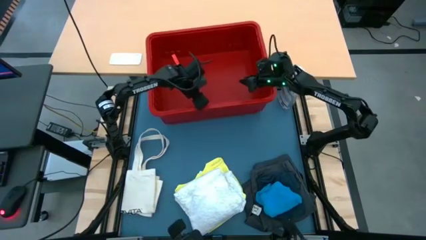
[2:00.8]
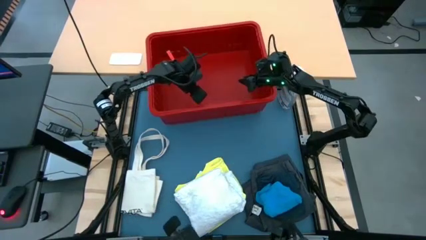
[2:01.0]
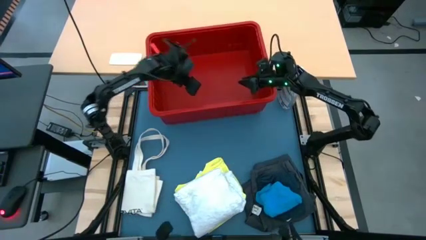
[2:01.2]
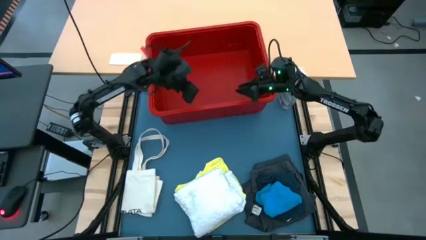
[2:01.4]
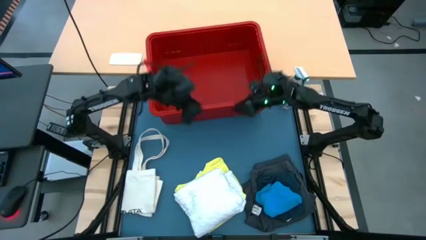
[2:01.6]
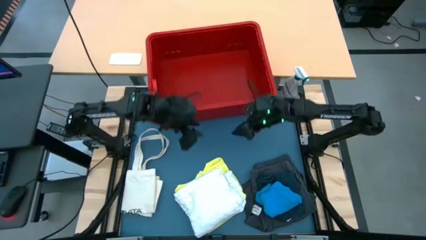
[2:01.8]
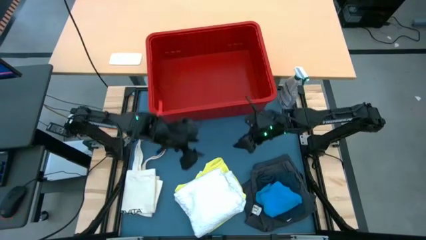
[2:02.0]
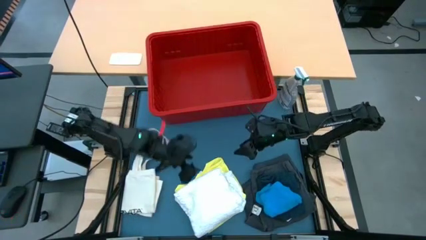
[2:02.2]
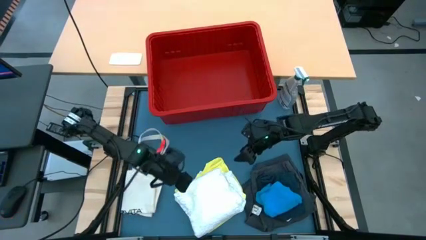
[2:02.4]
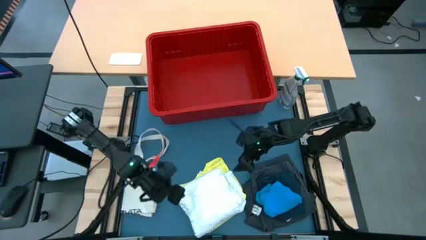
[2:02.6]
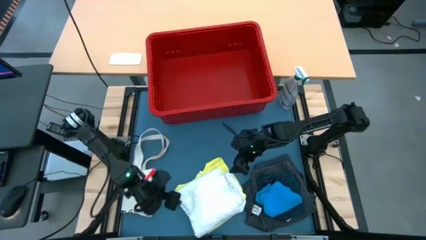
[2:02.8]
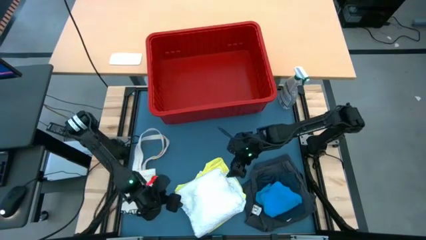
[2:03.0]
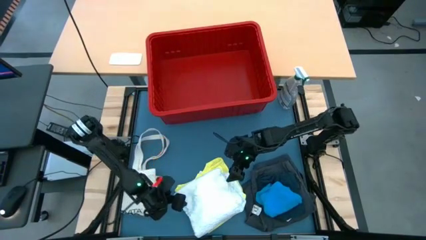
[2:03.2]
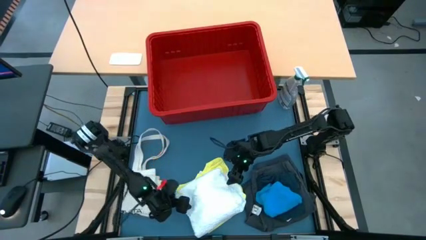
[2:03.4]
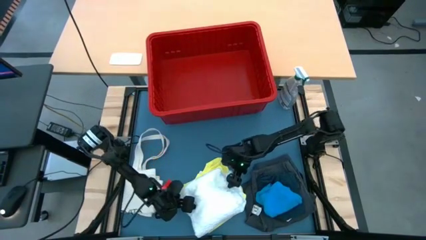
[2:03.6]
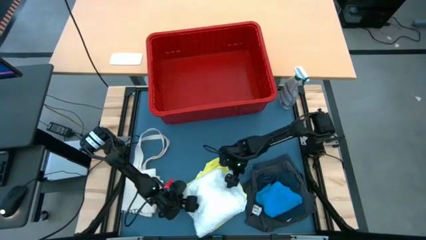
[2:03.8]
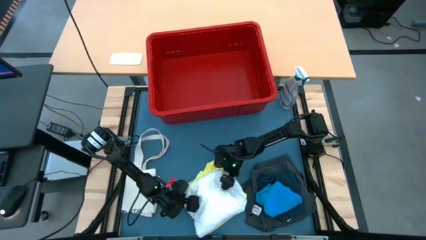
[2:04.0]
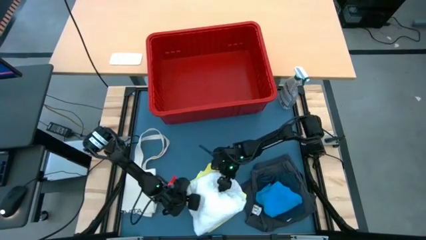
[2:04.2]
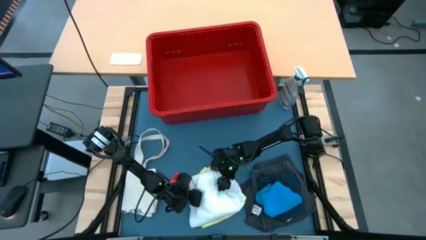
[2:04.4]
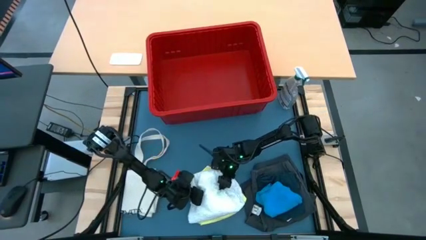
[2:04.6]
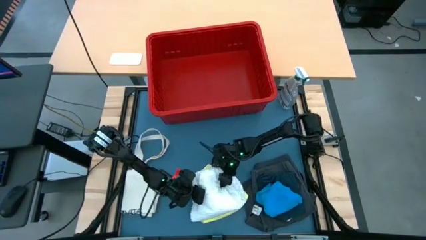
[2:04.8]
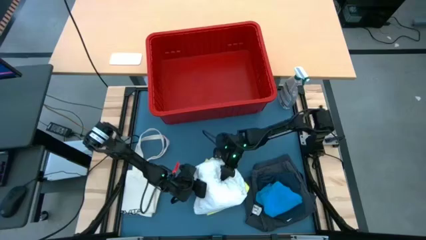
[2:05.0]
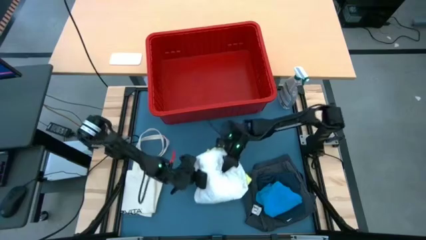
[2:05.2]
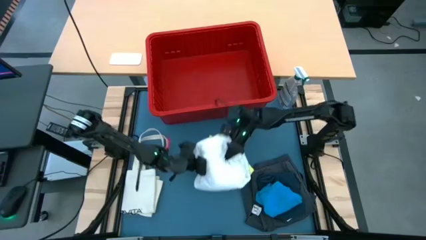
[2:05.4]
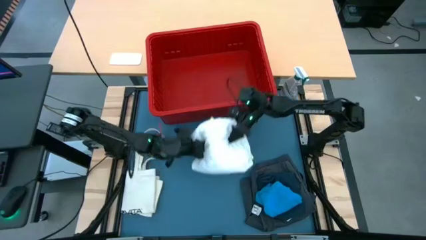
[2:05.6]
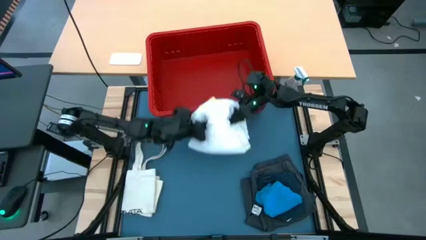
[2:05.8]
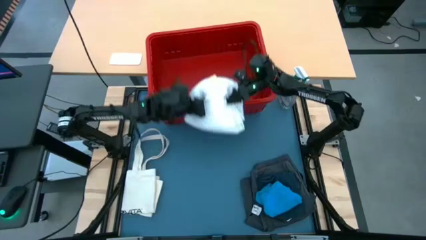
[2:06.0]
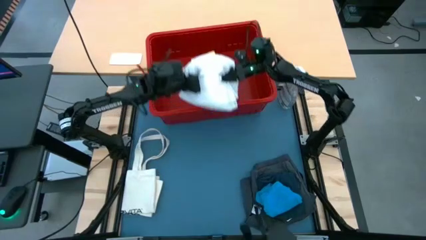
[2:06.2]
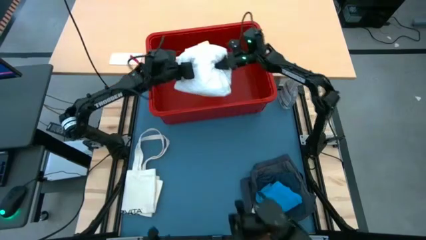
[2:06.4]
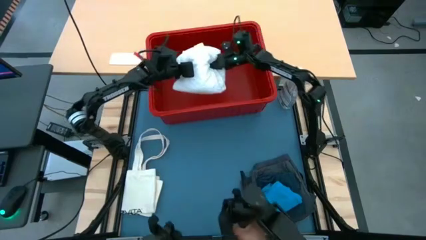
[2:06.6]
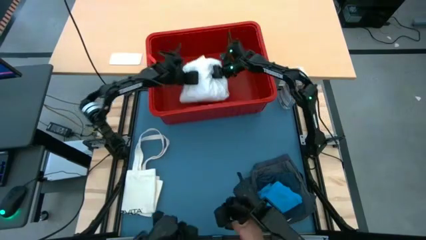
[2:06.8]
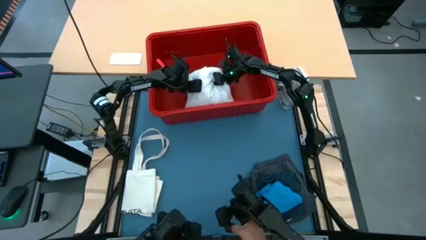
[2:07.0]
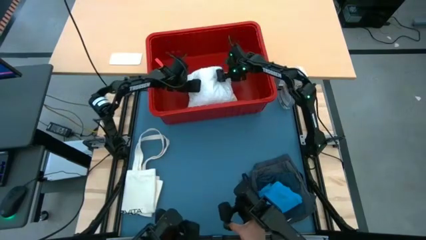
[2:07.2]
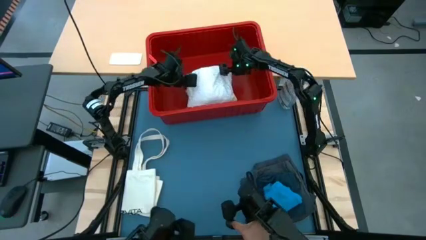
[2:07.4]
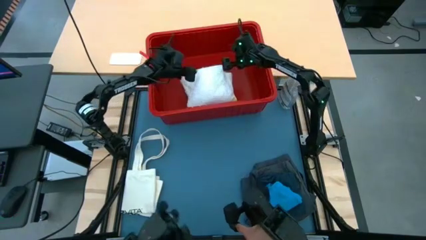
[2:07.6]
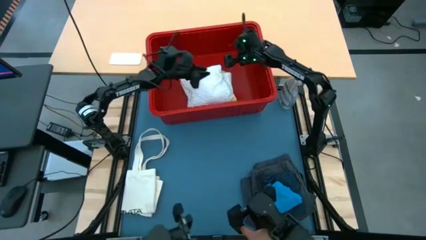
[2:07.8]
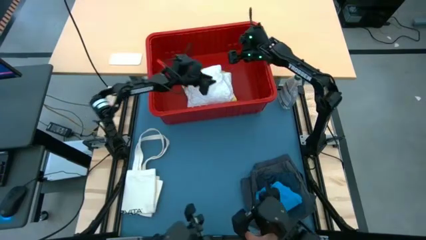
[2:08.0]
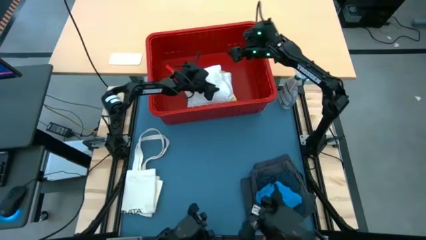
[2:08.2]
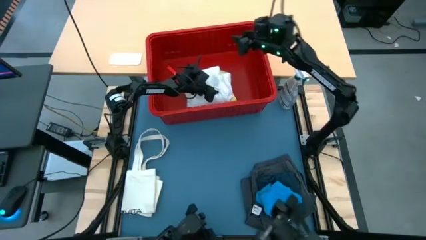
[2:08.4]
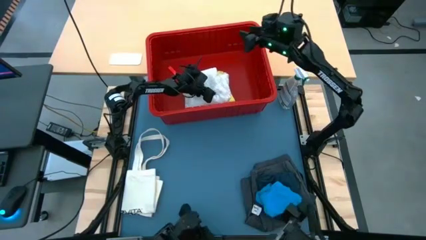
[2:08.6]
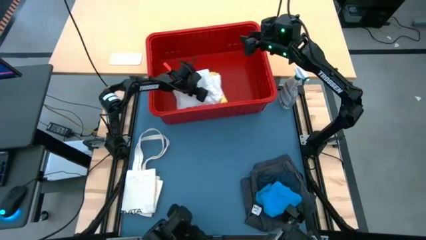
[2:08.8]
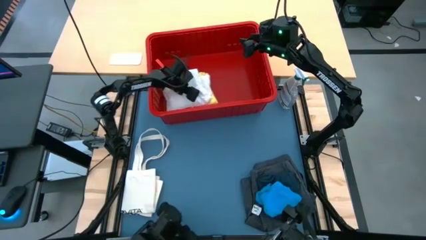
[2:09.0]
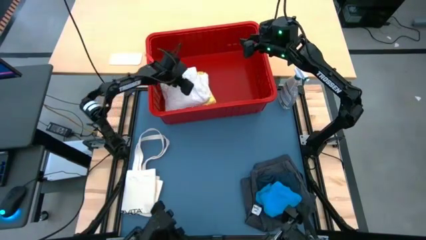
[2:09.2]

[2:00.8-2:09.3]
Task: Fold Laundry from Bin
Put the stacked folded shirts into the laundry bin

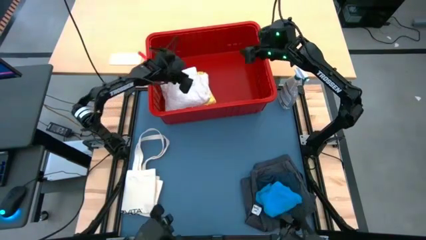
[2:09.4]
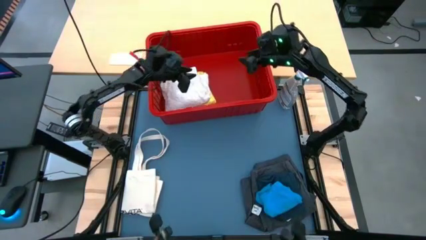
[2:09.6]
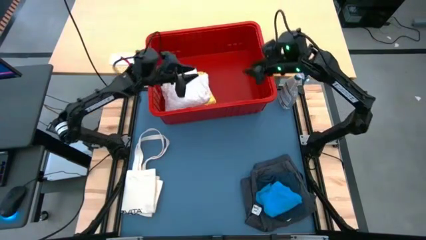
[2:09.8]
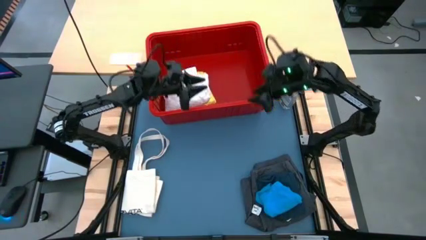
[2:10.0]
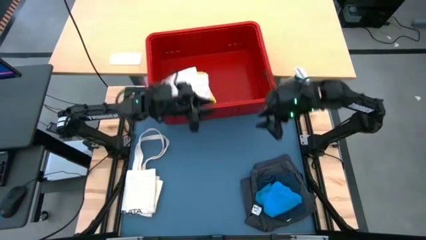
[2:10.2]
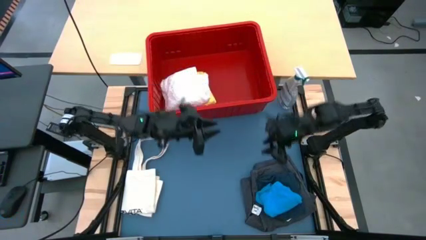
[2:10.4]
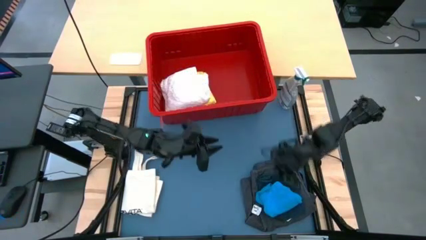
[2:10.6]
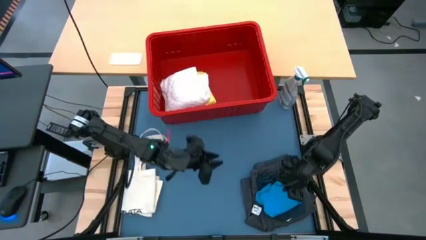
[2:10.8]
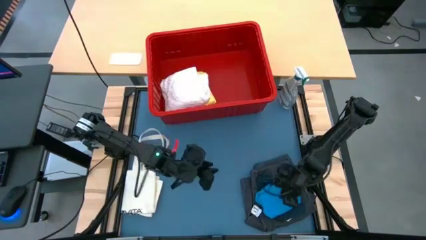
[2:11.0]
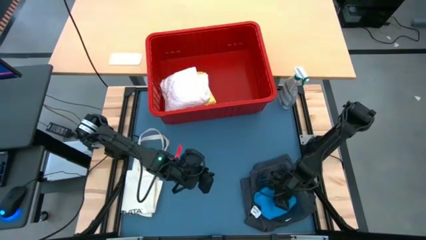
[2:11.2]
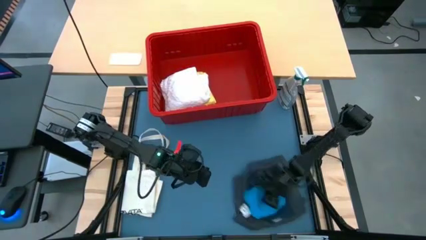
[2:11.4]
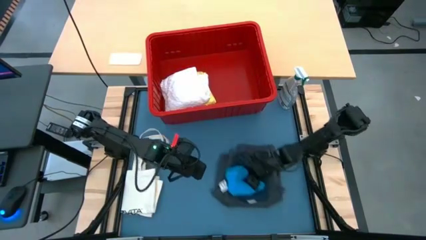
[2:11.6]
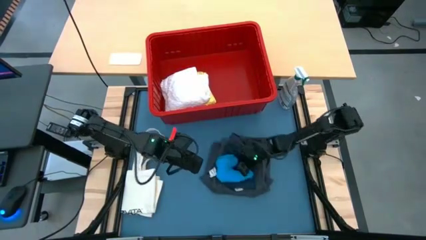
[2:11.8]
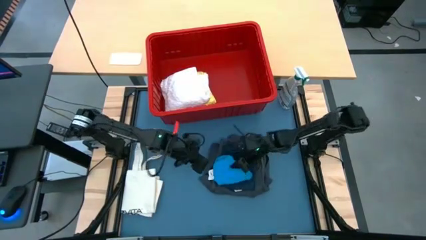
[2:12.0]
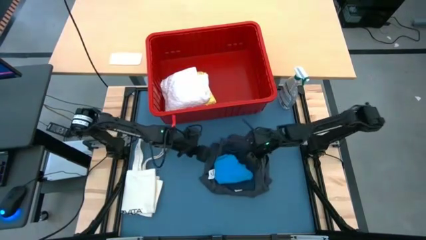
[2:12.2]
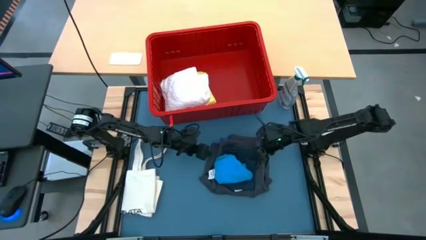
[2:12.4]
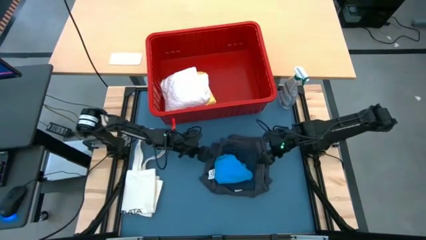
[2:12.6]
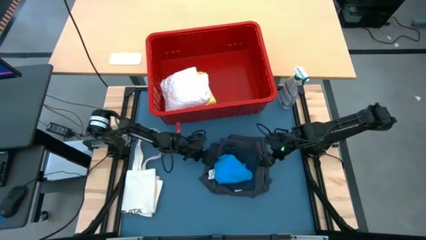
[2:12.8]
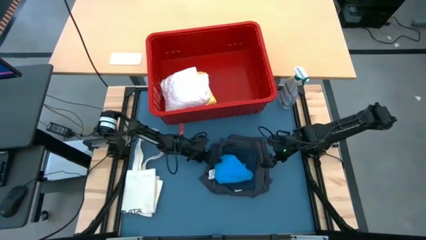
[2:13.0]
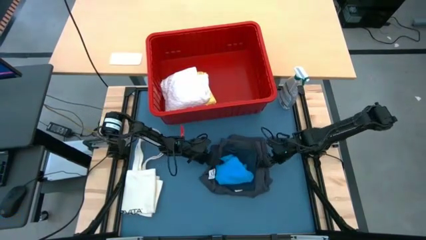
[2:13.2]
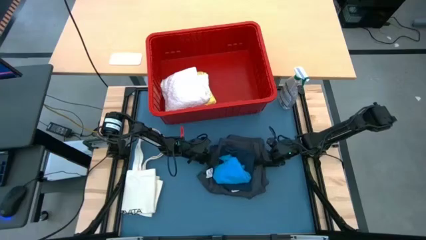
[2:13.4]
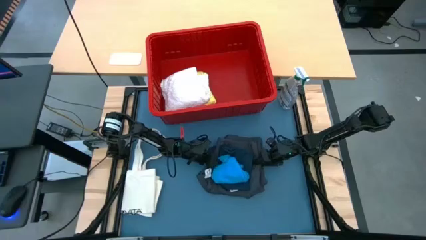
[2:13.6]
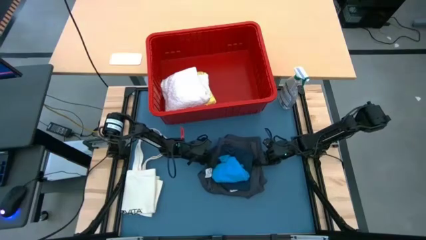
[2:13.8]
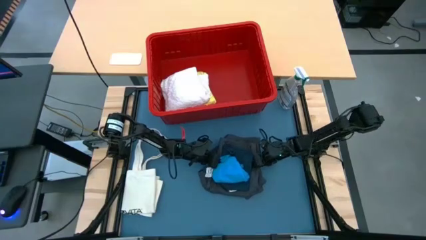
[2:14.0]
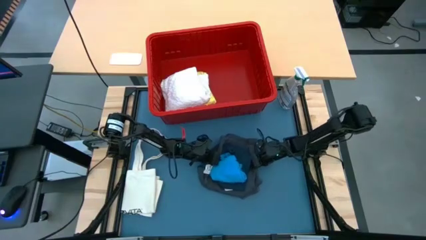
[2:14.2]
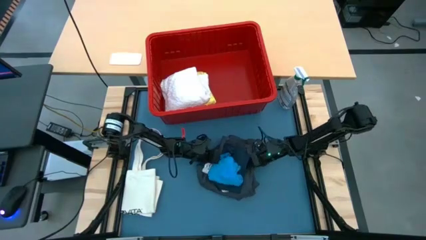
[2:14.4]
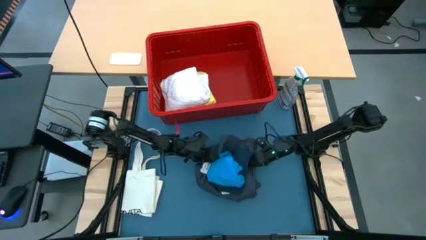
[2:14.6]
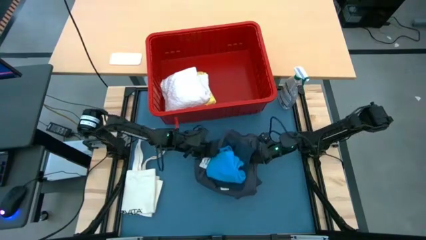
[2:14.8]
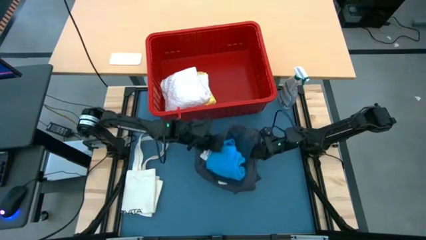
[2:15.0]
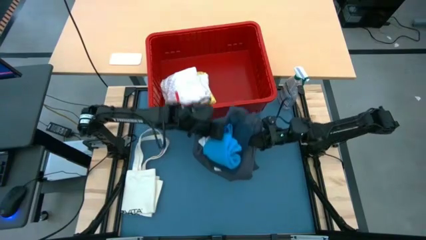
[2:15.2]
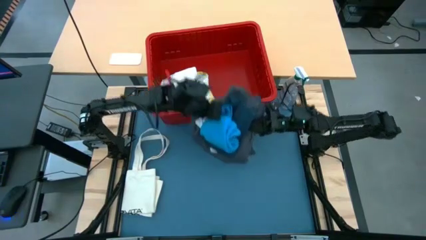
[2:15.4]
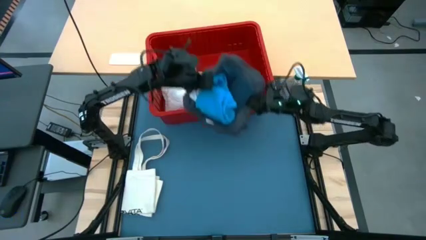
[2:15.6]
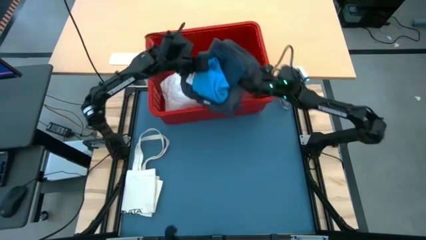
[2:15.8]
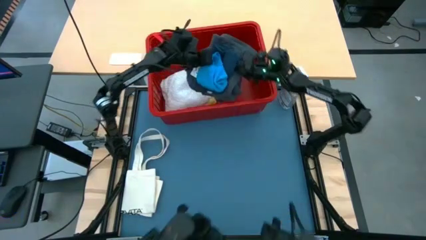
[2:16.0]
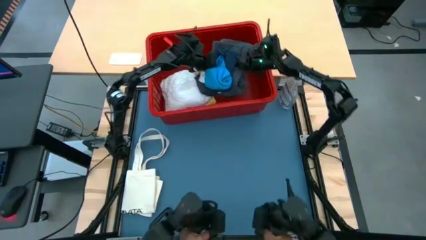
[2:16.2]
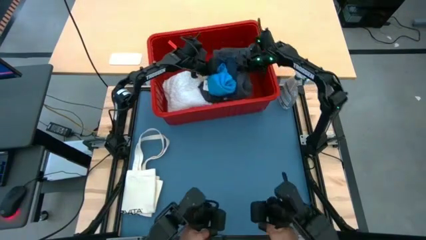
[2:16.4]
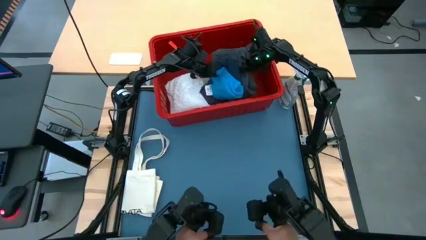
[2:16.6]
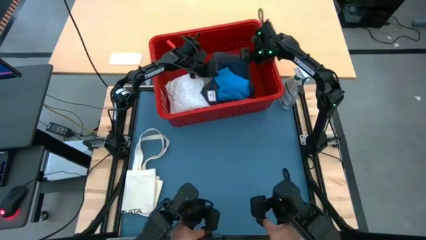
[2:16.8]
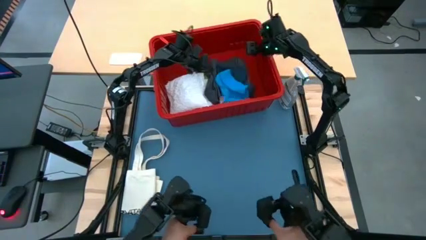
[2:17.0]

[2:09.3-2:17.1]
Put the stacked folded shorts into the laundry bin
